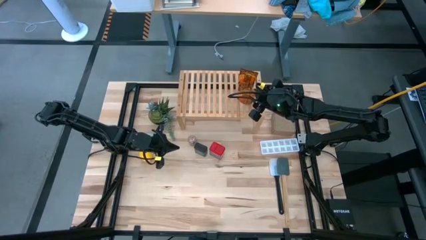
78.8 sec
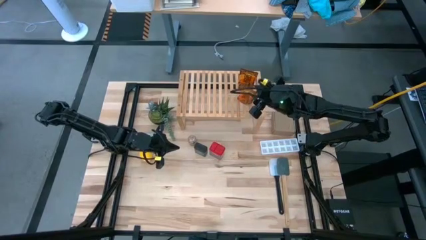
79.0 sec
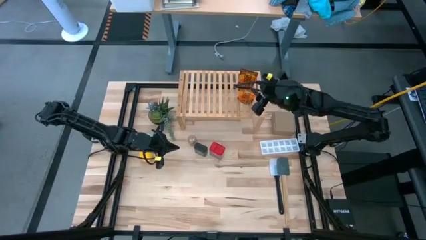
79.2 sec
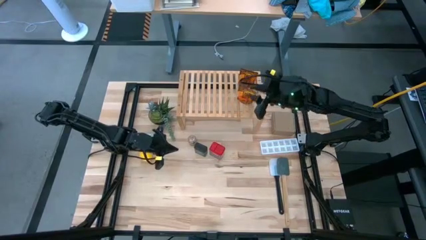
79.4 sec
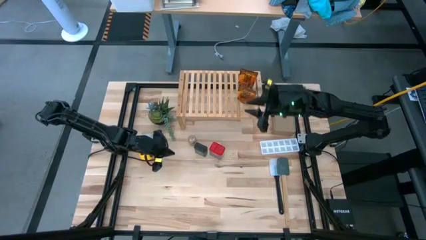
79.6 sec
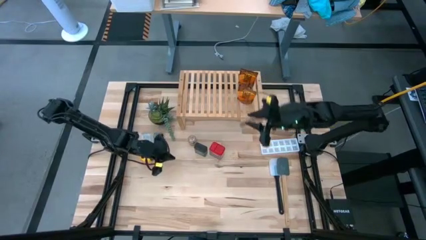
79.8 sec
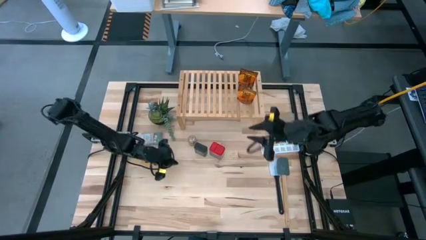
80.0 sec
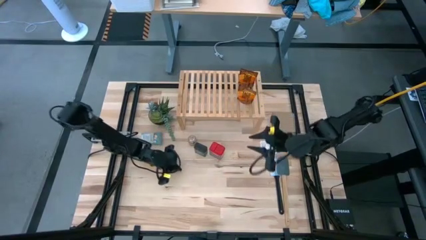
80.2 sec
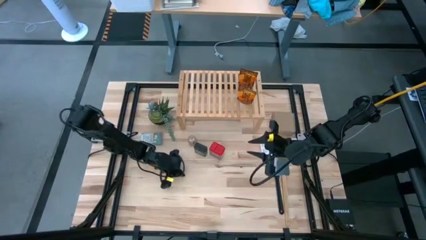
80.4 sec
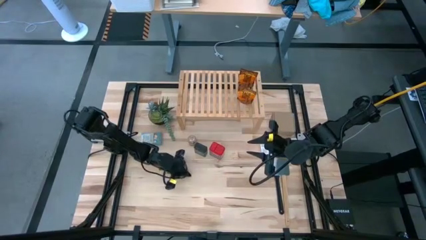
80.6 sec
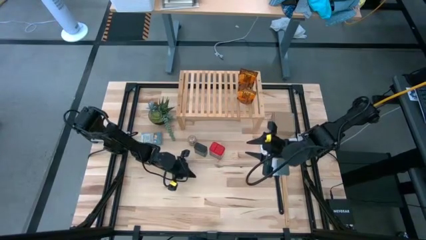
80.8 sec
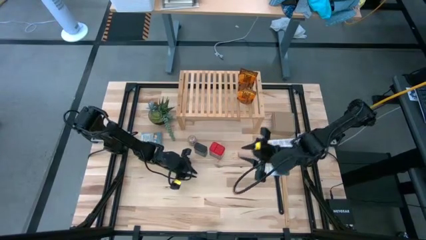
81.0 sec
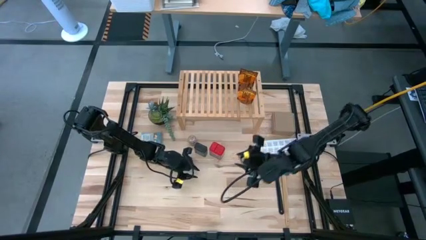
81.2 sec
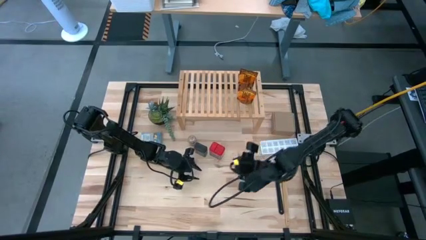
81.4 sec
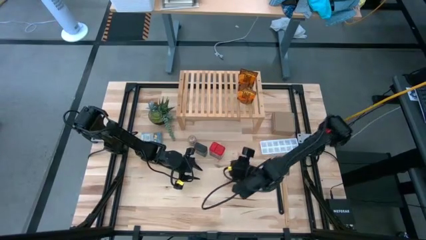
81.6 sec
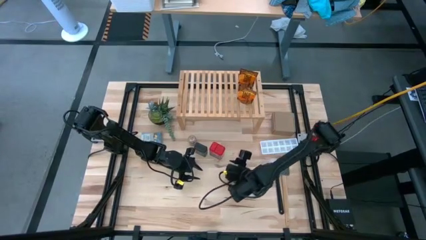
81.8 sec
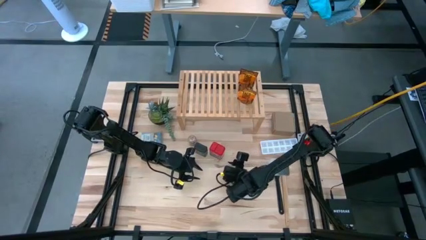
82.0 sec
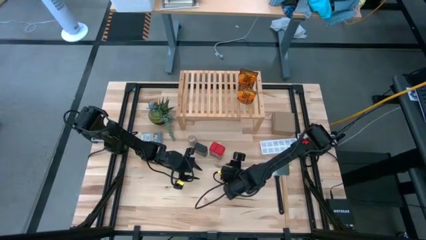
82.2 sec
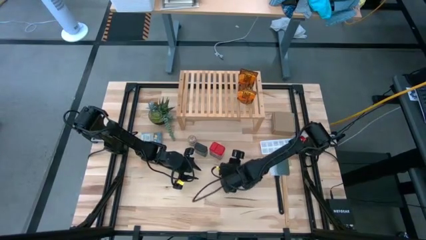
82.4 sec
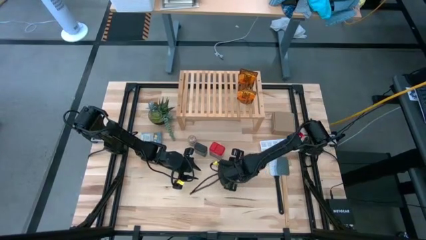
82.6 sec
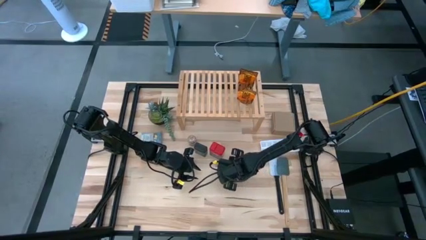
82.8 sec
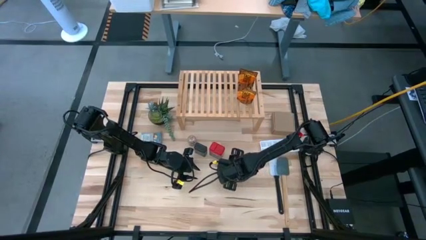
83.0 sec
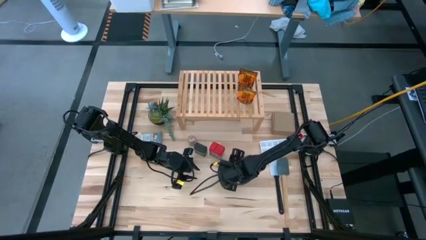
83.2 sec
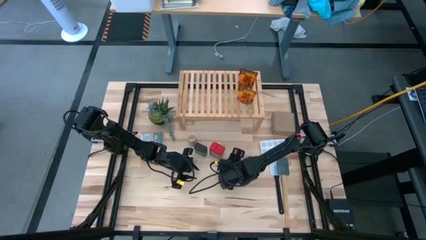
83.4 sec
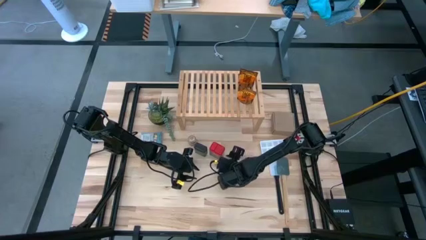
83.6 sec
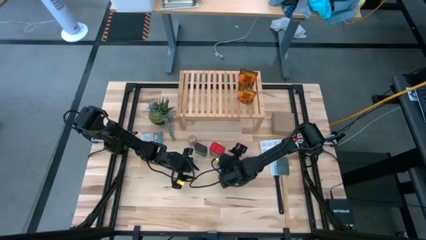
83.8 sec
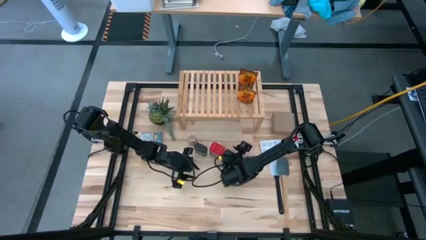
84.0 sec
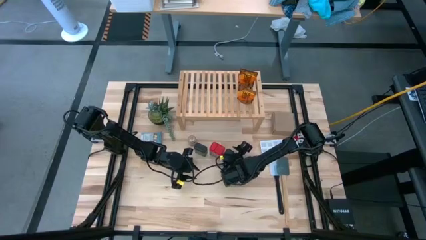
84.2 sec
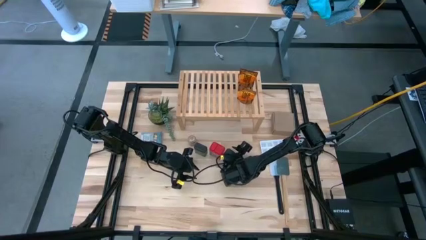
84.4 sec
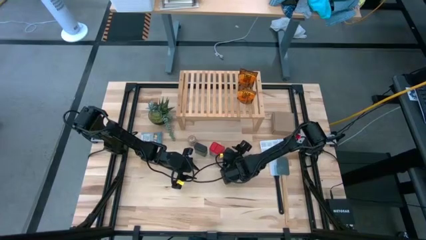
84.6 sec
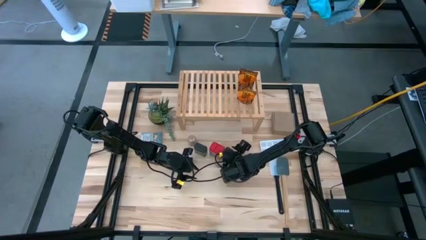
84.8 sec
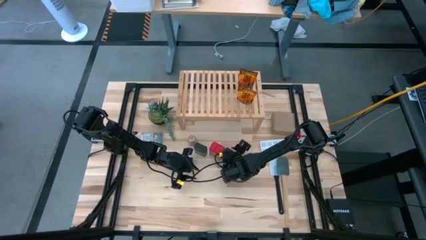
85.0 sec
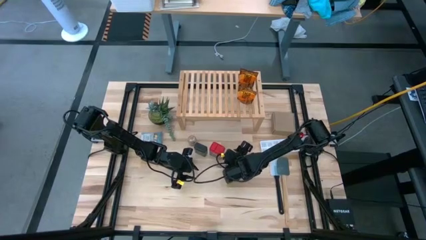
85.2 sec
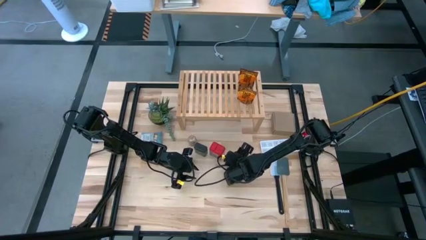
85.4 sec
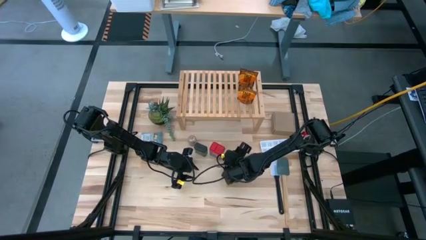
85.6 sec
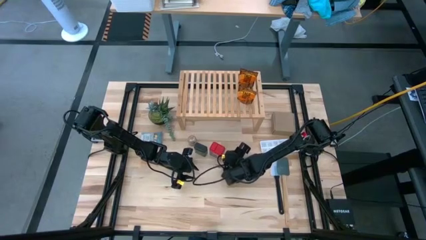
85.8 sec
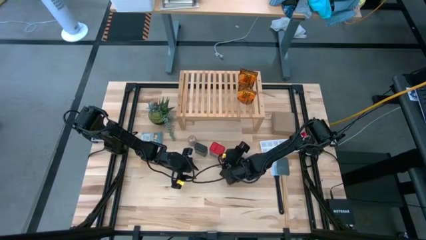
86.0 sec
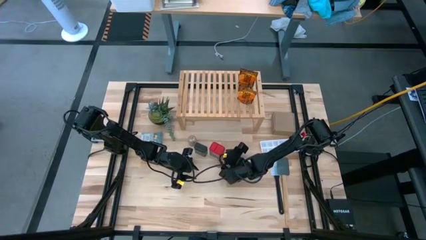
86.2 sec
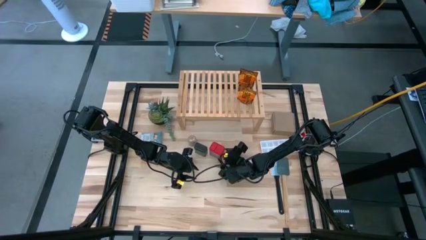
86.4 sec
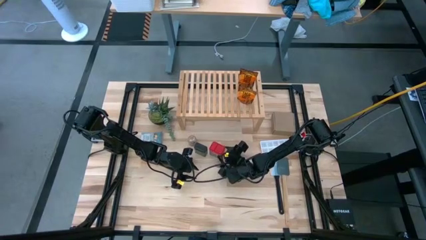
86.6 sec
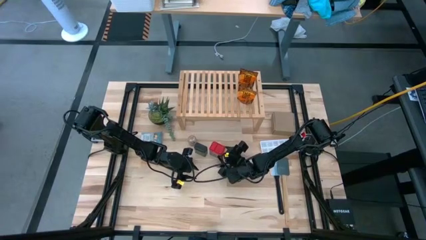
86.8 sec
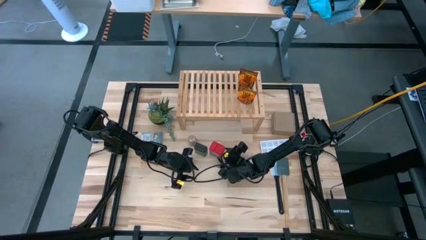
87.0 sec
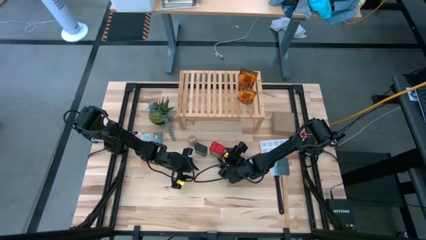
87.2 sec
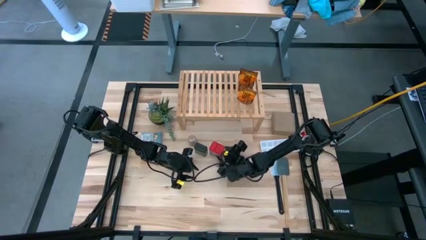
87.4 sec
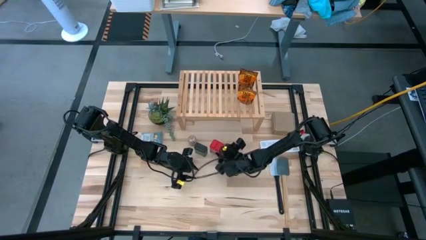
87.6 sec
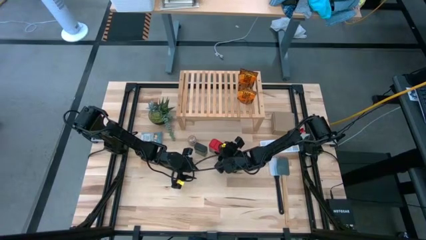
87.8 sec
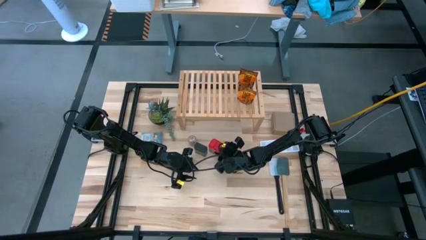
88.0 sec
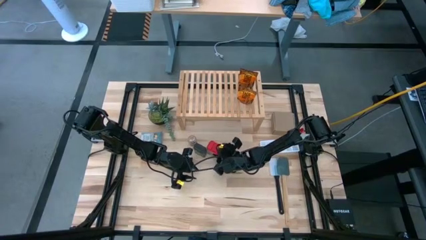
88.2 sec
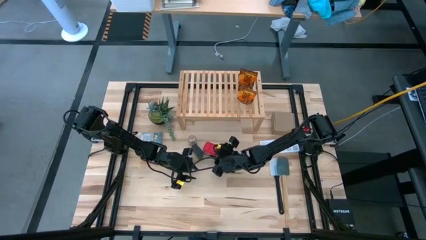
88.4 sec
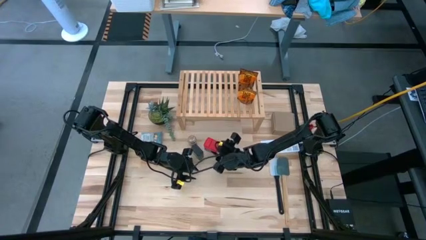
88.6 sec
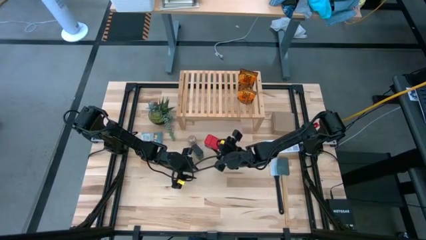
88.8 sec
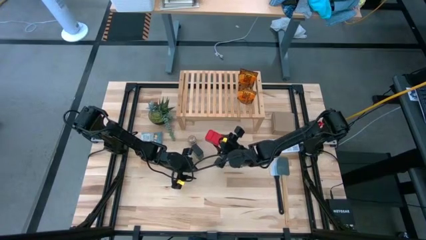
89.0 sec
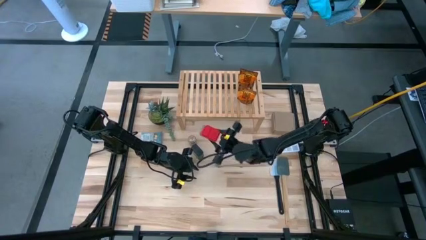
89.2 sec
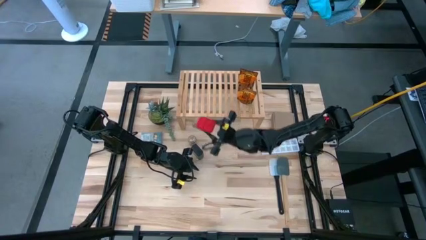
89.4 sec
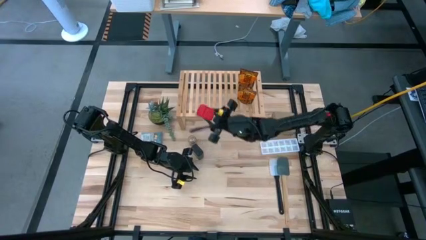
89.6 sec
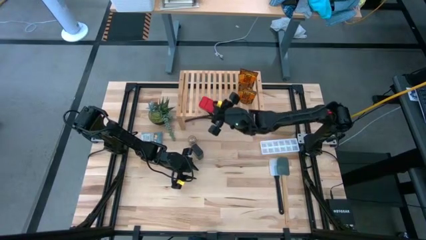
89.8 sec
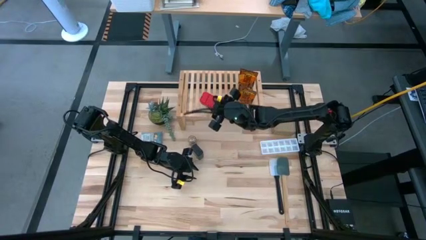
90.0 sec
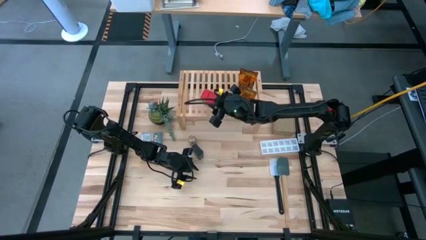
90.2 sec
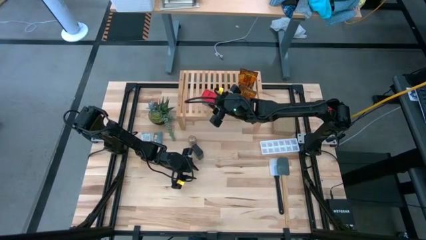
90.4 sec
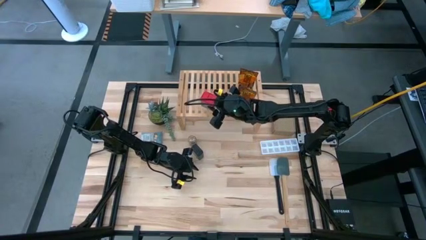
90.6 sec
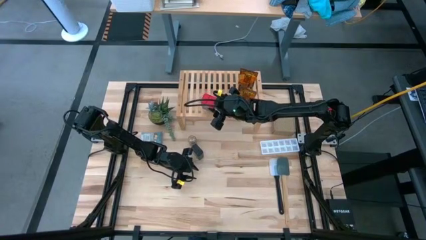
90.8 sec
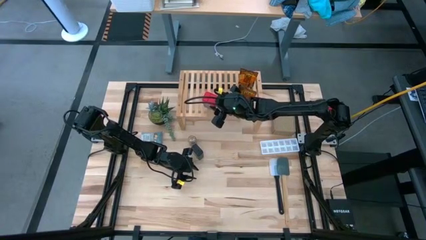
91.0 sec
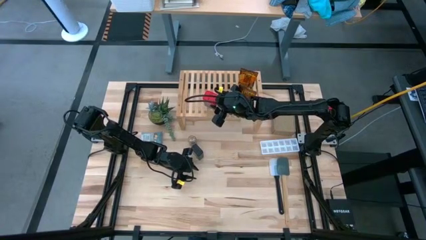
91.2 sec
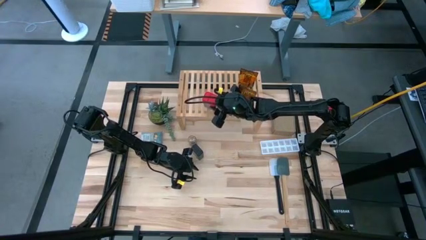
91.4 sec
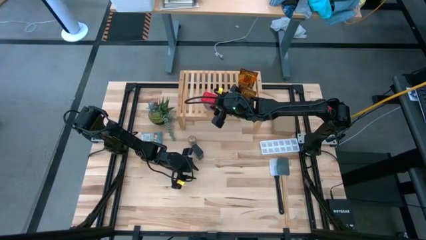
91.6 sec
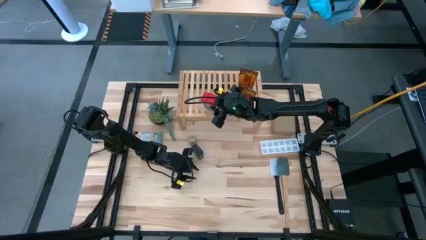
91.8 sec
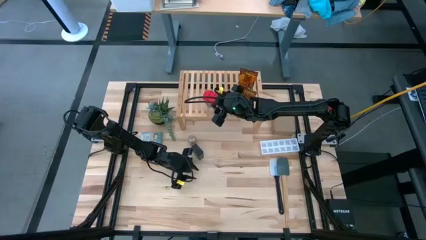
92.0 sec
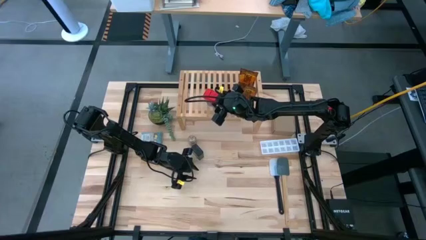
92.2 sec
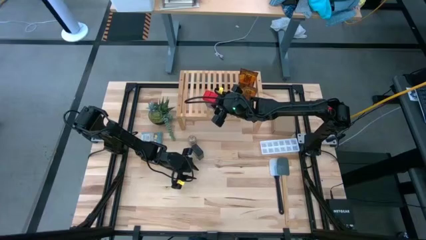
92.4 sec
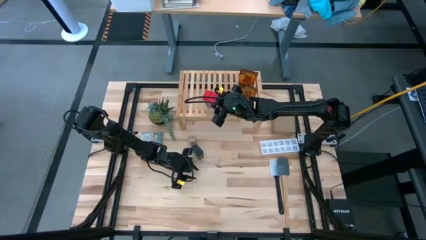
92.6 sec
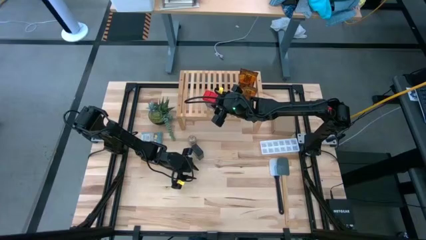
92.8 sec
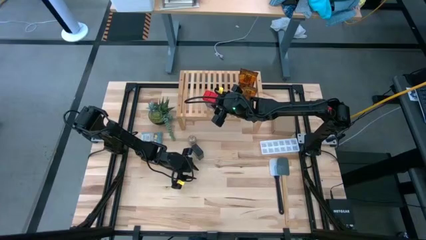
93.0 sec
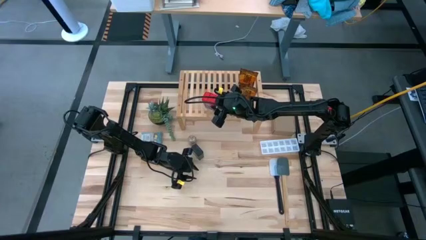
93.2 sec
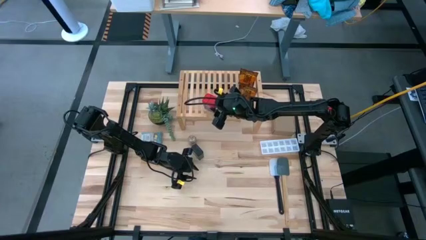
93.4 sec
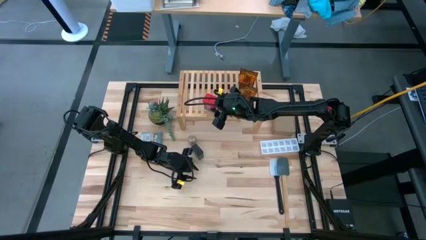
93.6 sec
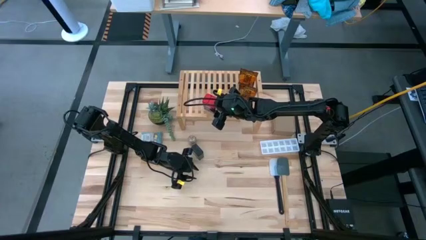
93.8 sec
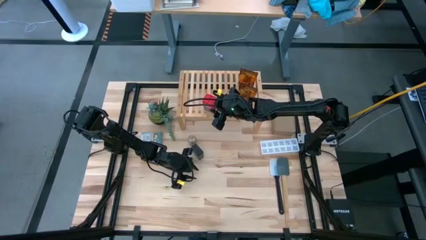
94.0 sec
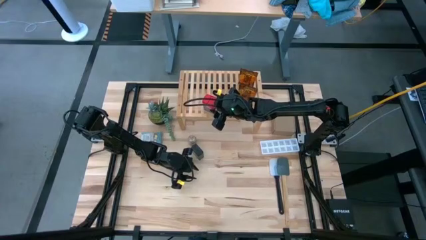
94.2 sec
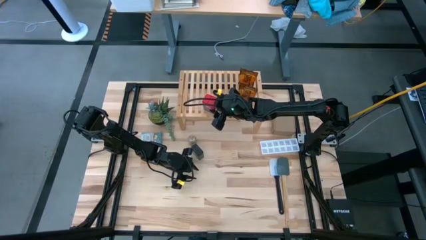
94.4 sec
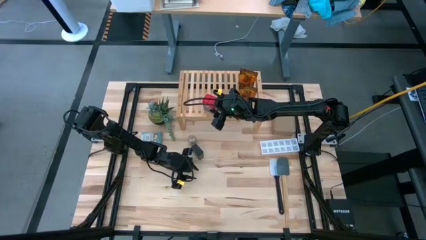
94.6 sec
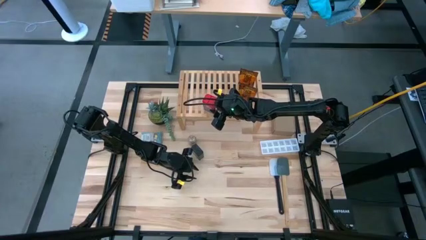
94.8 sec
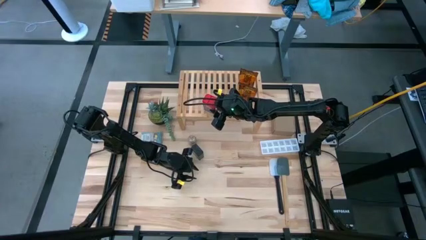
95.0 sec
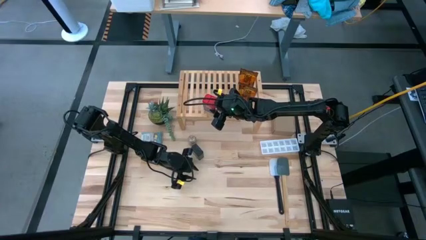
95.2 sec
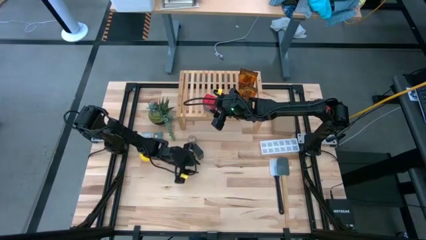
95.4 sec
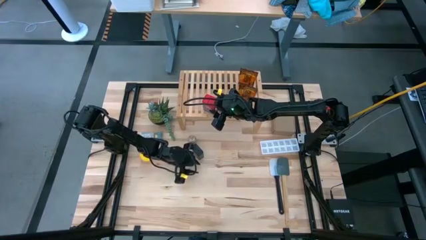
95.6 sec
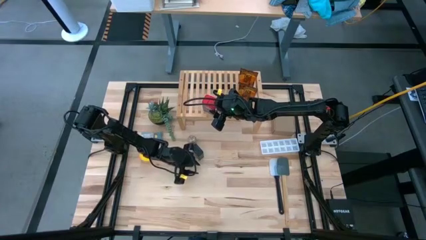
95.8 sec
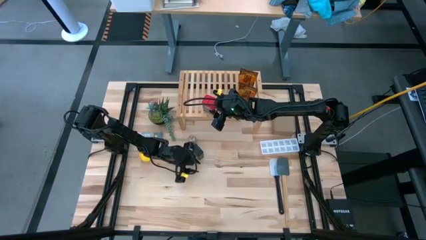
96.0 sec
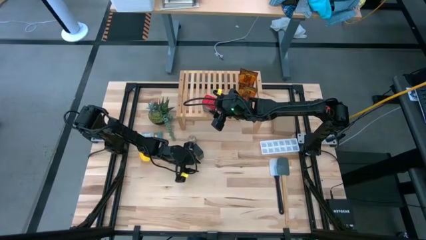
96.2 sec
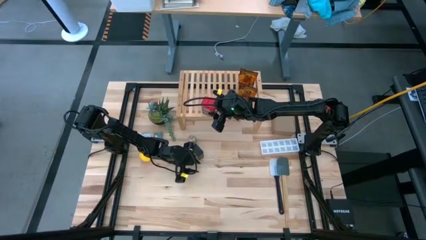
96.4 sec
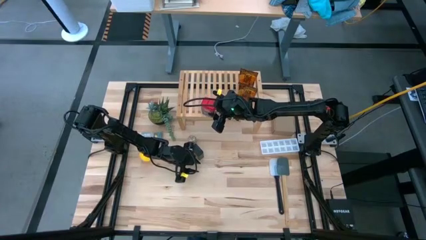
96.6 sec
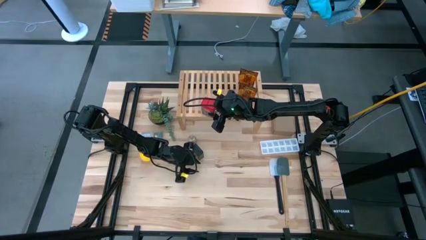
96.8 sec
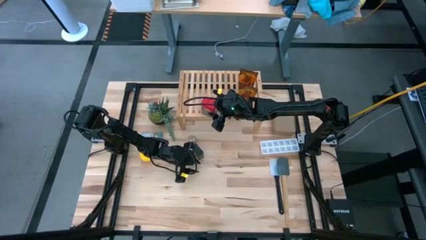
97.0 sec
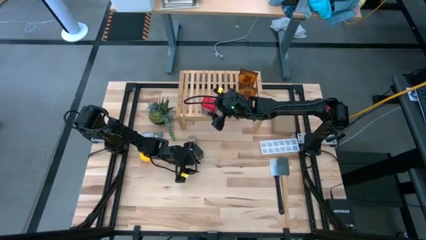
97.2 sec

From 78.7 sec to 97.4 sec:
Task: Shelf spices
Put the red seasoning can on the shelf
